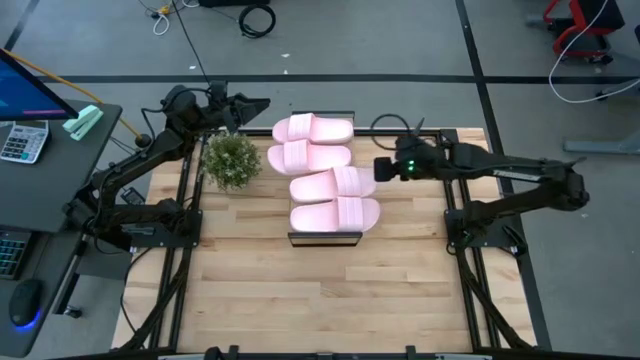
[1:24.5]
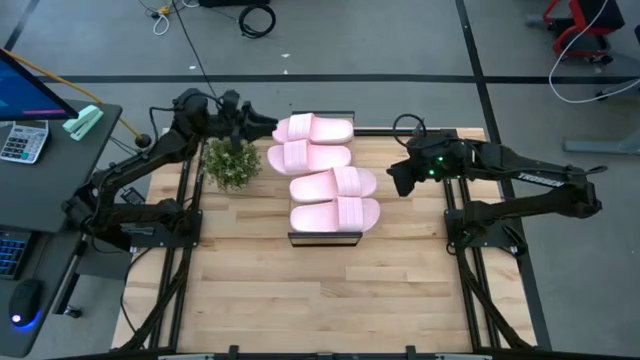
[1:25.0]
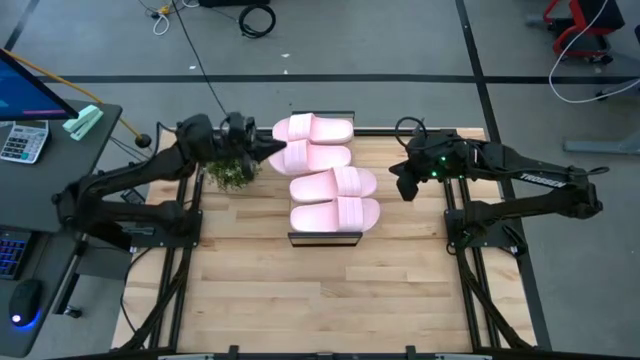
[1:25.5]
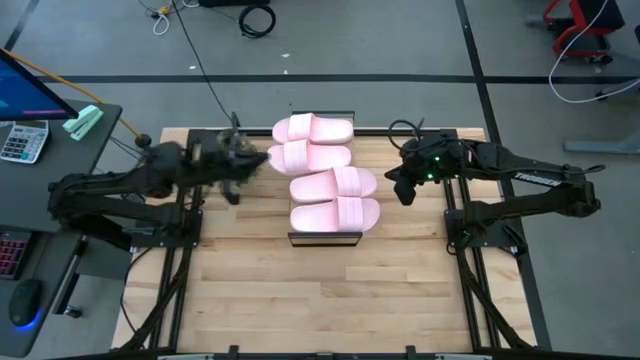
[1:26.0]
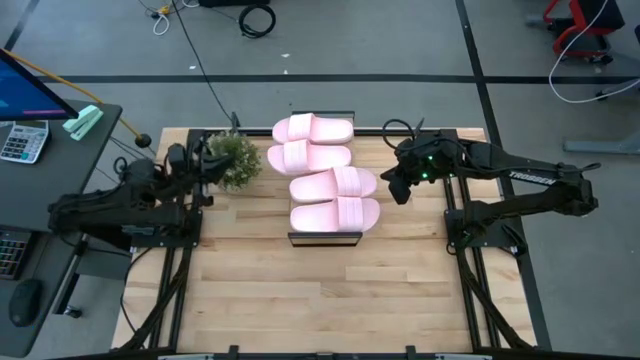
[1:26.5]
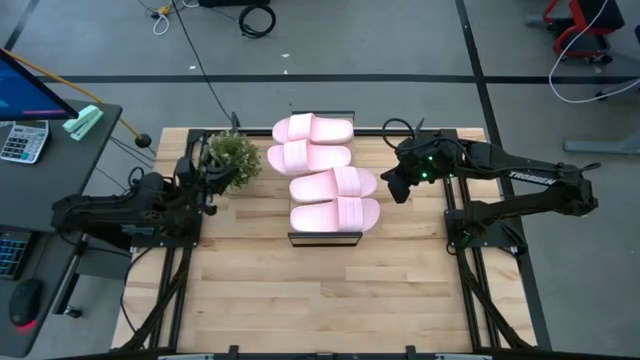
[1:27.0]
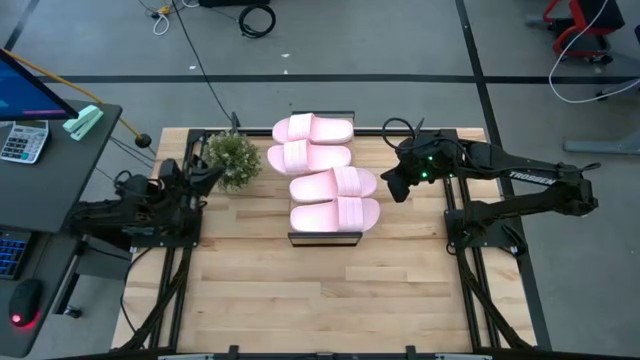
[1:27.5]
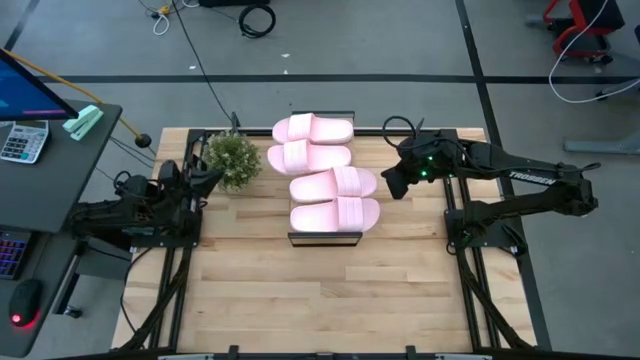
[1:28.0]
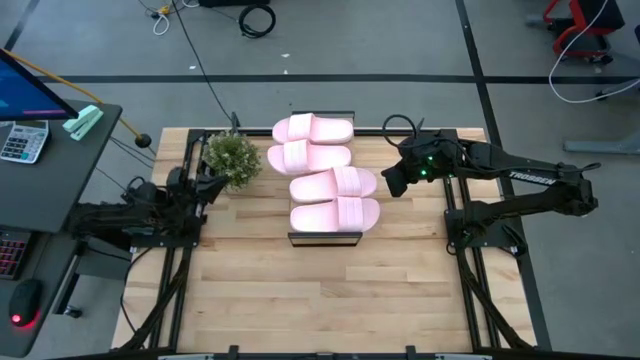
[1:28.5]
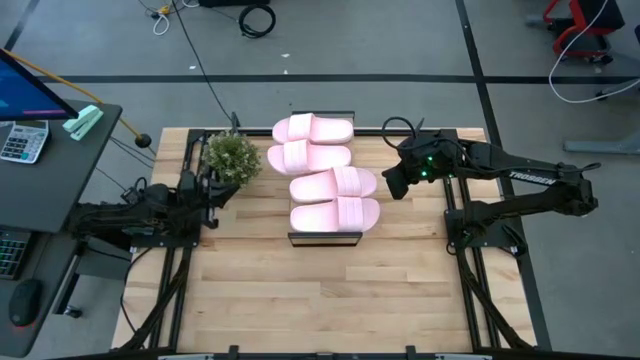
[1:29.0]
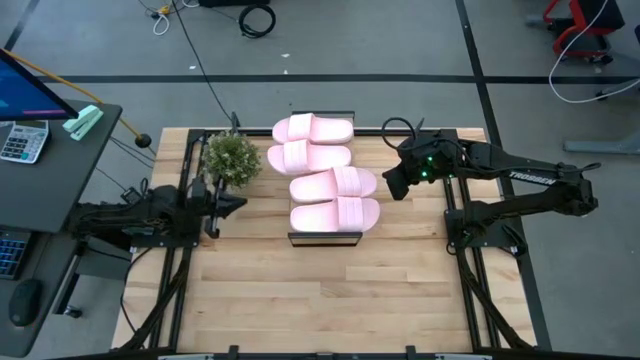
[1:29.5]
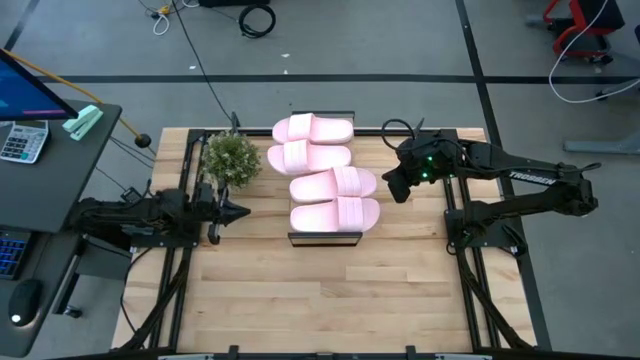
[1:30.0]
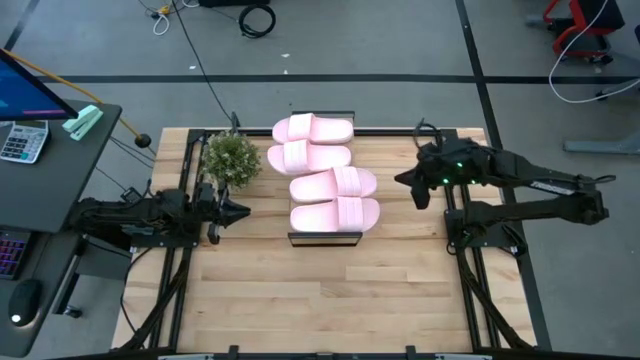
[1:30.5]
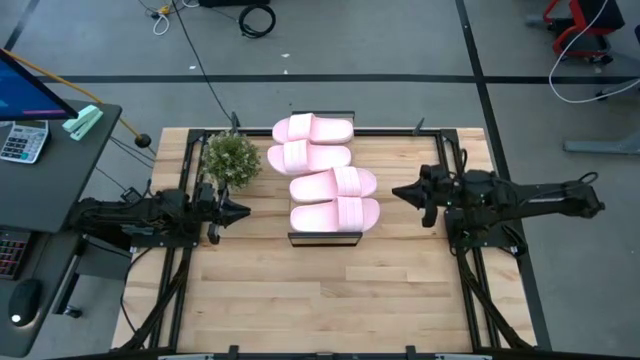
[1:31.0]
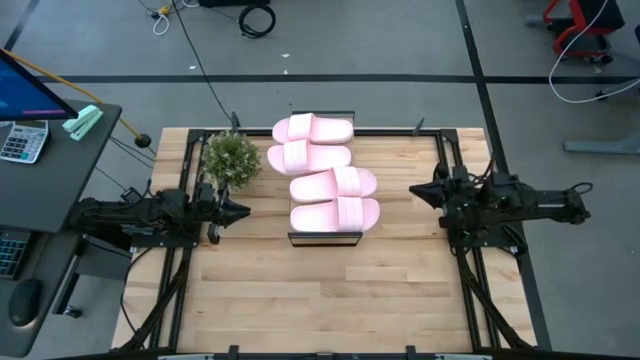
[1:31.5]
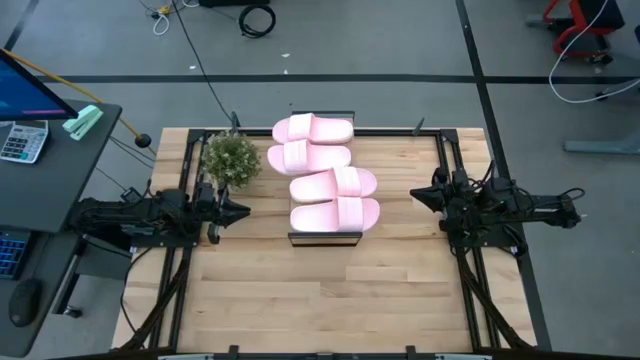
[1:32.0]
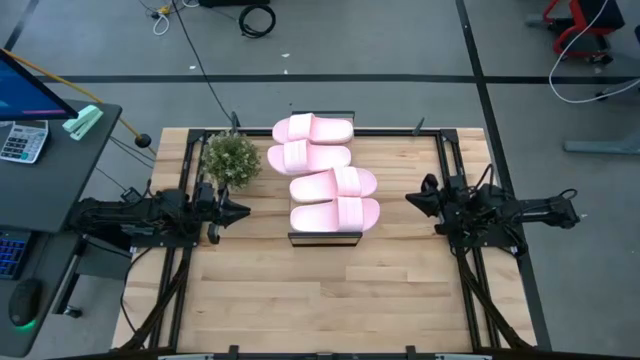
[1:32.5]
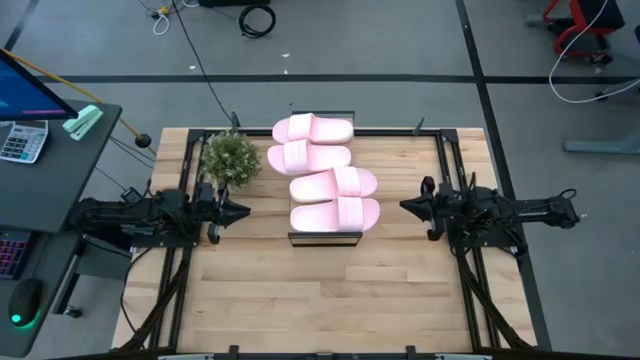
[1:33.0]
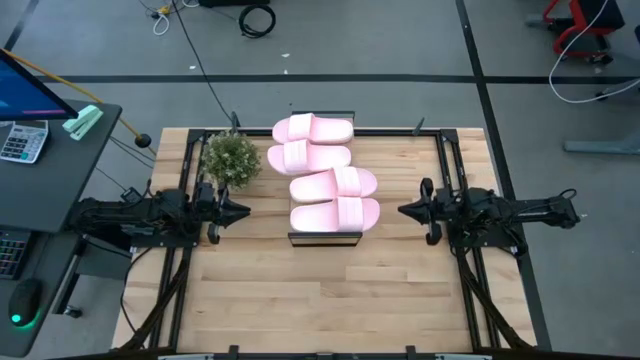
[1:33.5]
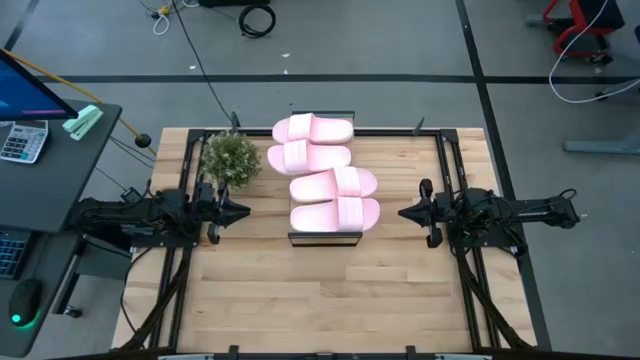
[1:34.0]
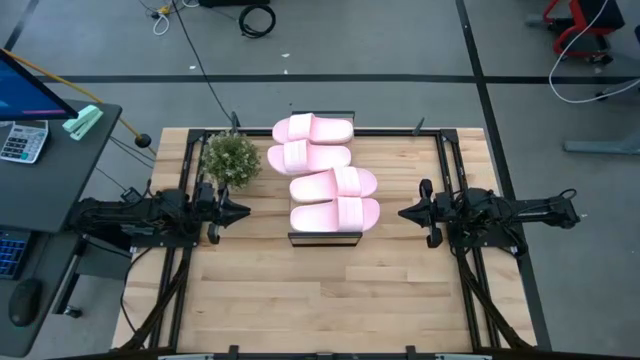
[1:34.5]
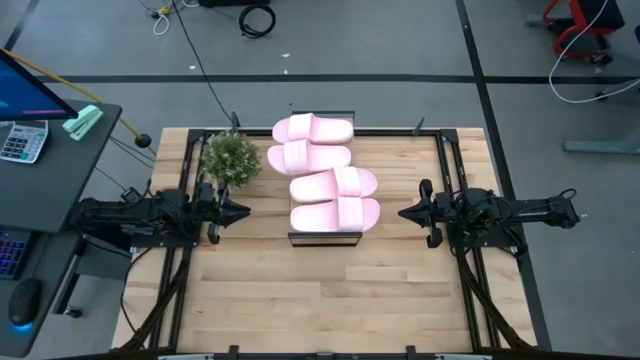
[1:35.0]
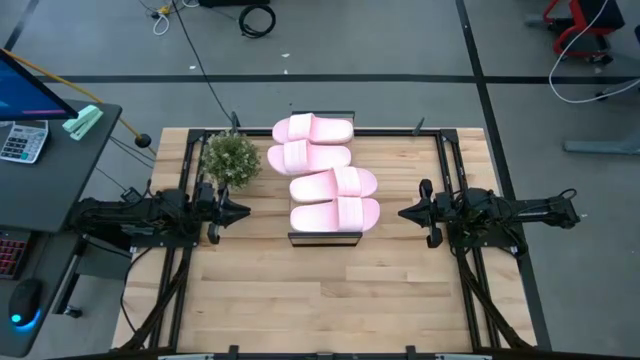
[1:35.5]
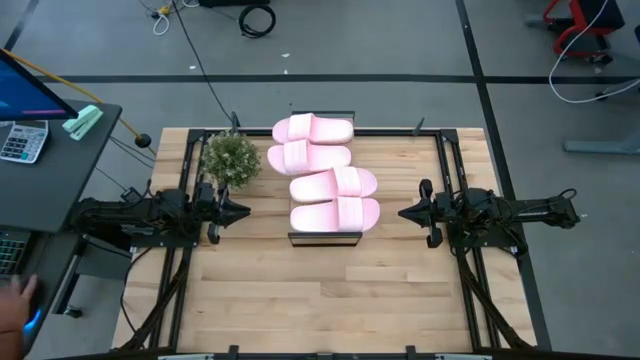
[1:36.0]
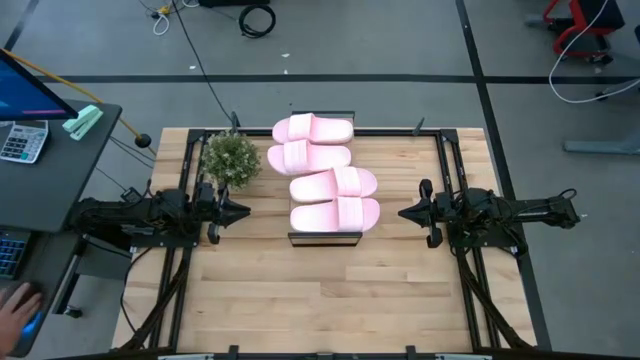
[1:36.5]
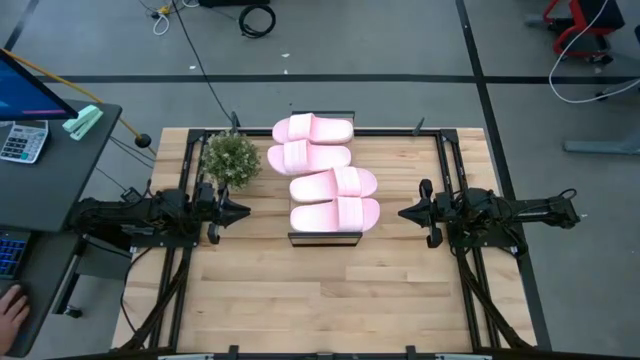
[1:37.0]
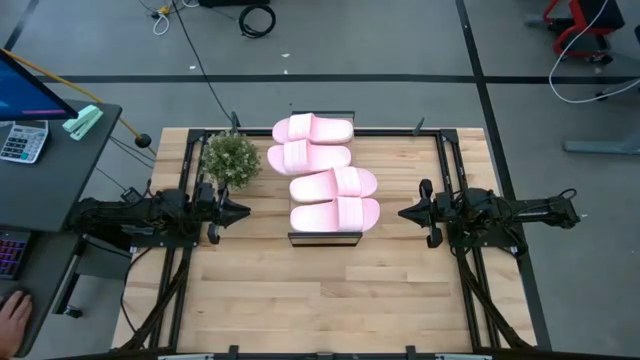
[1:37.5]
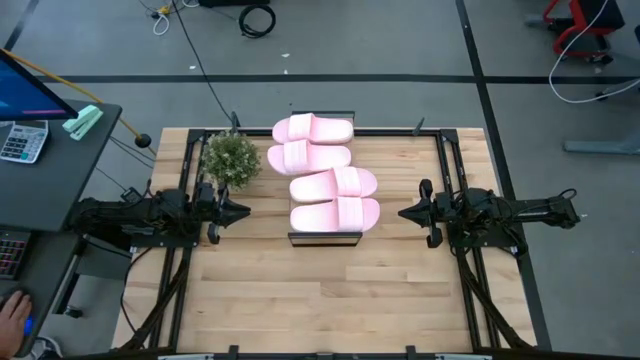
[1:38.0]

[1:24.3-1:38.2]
Task: Pick and place slides into the shelf
Return to Home Position

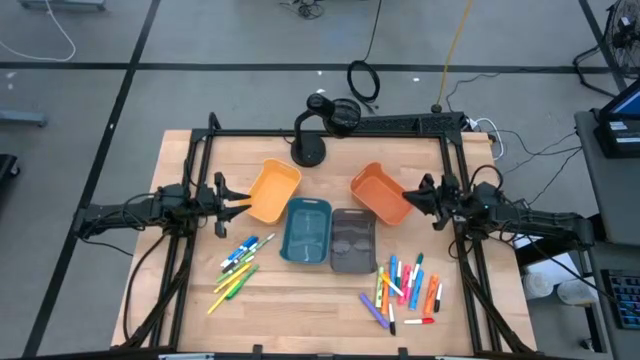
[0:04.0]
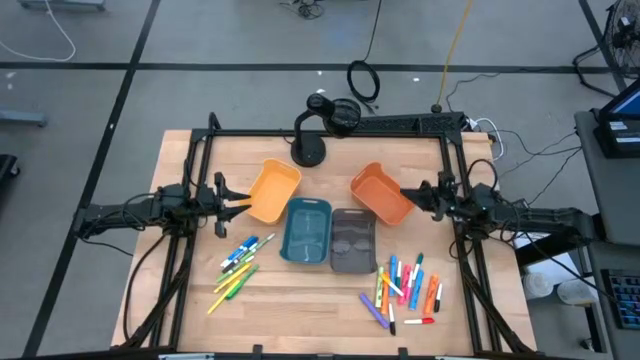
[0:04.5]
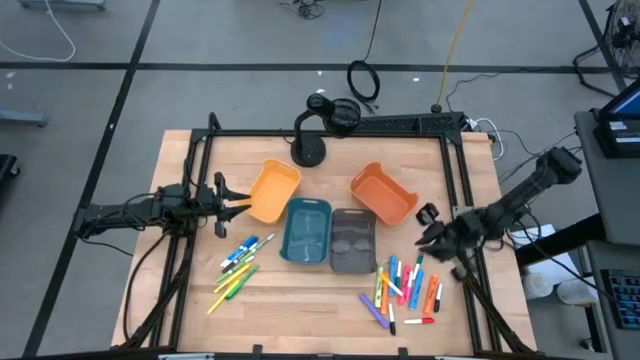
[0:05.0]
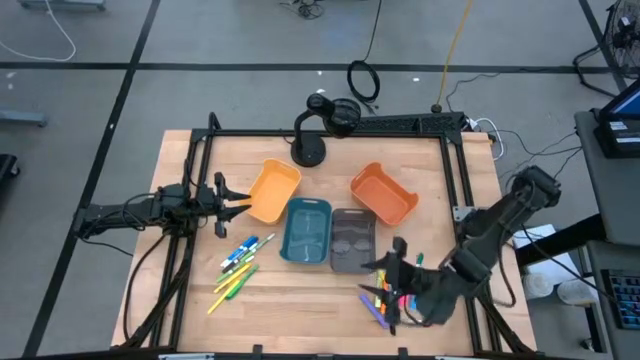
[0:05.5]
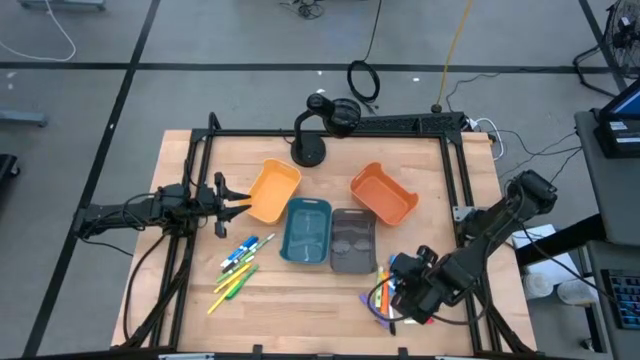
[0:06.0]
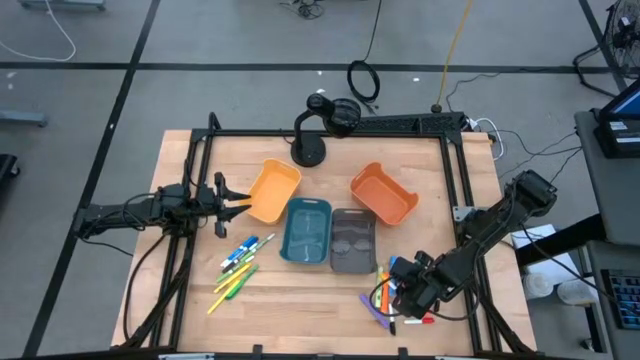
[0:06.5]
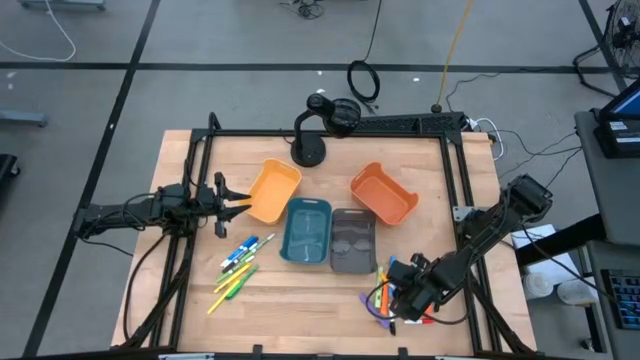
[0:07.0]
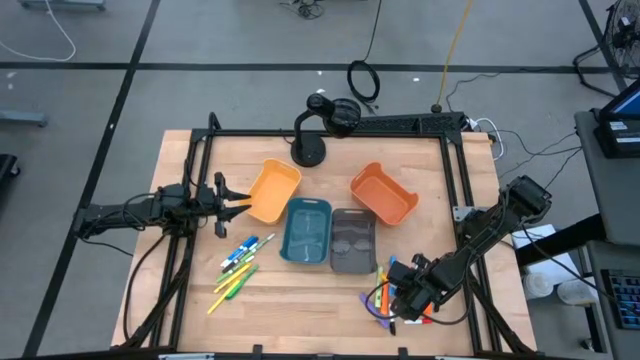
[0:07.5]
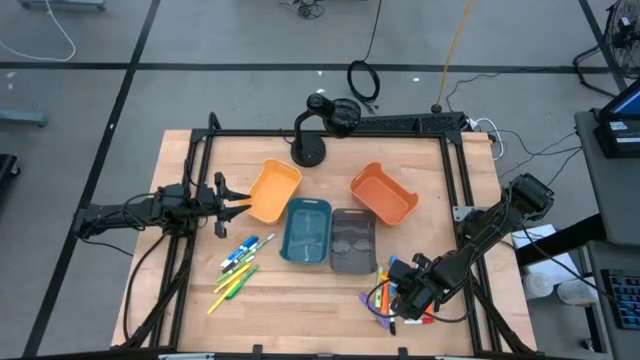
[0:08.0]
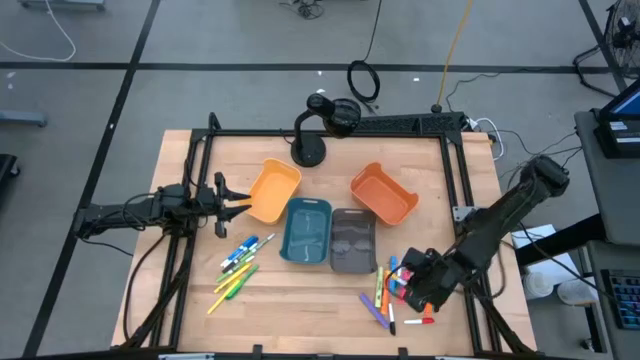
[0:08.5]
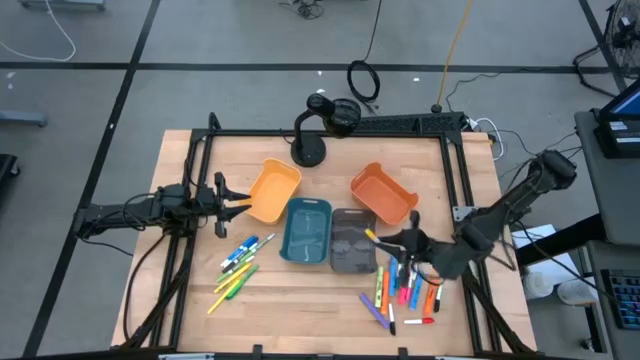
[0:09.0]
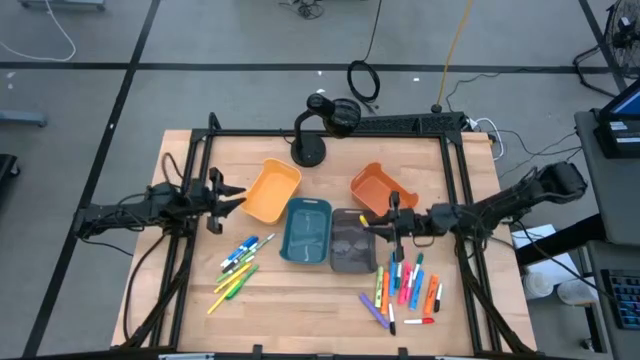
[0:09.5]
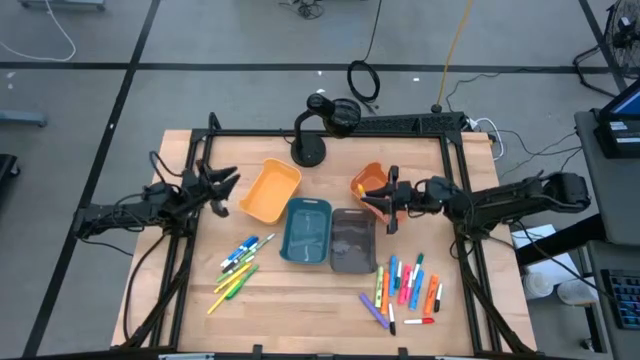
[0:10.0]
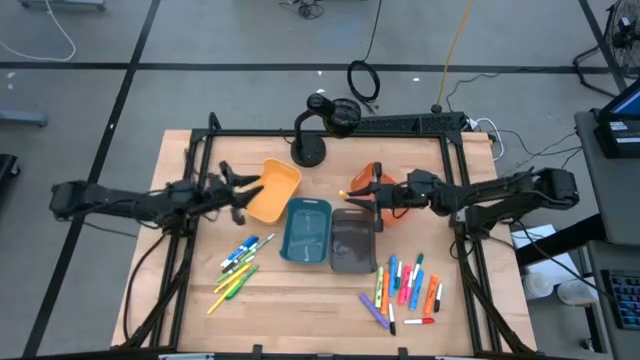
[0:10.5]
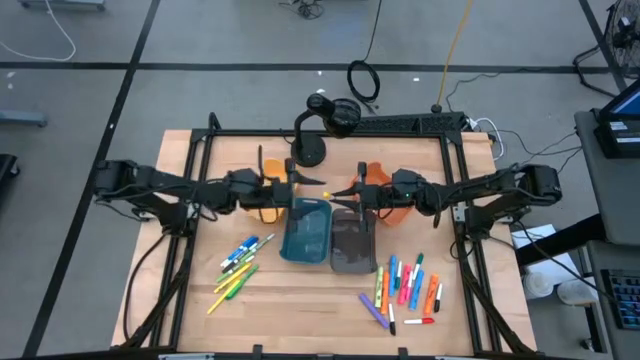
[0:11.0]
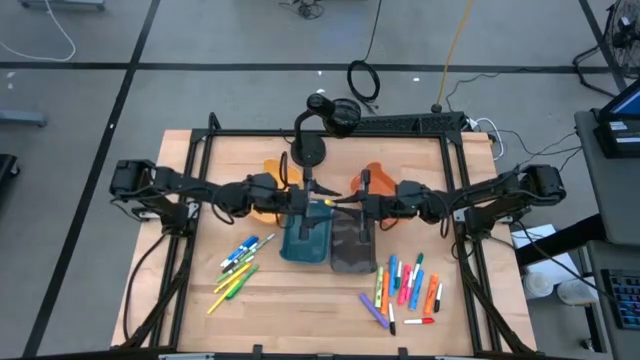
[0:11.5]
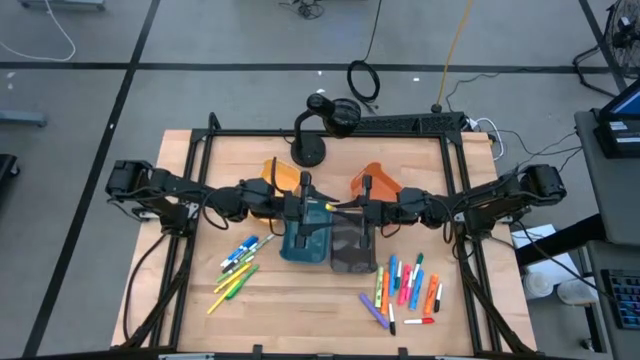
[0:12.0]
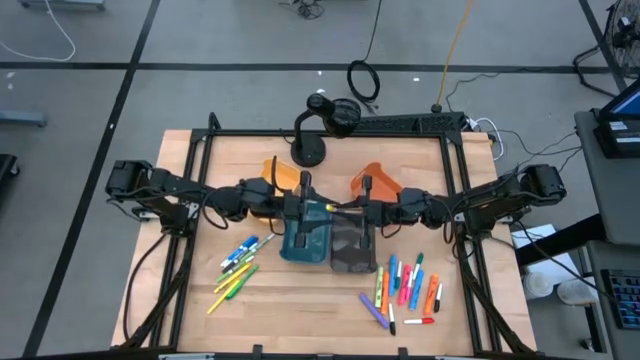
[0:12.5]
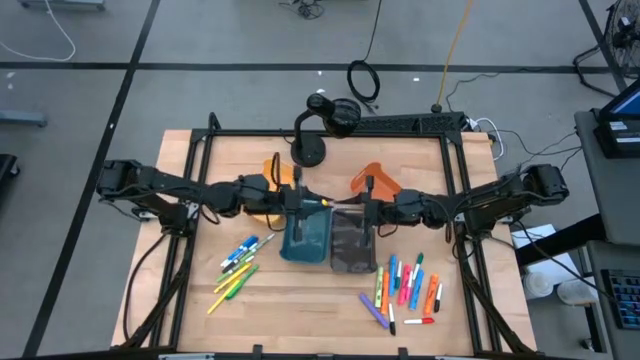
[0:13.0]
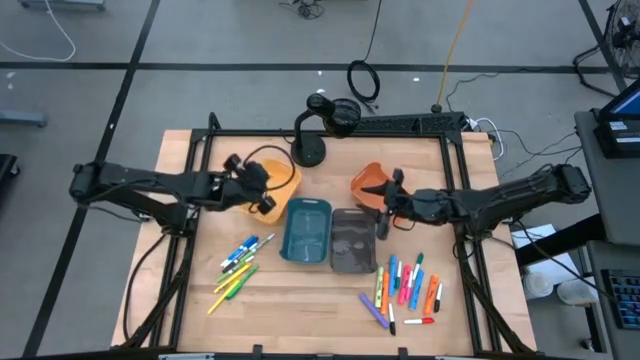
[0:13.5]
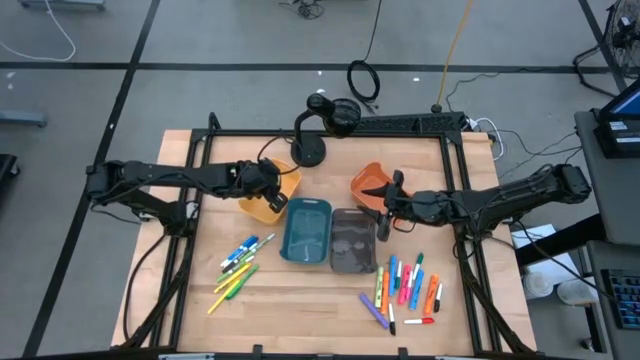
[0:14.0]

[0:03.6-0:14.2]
Task: Pick & Place Markers
Put the white and yellow highlighter into the yellow bin
